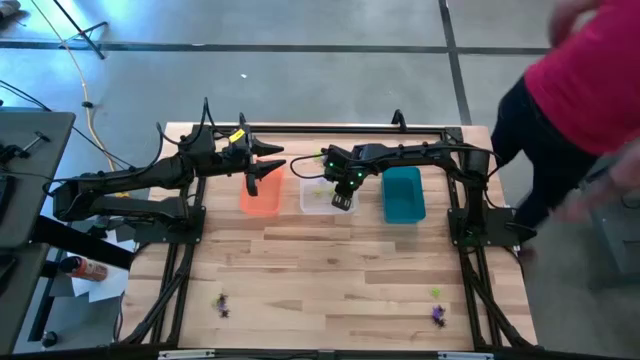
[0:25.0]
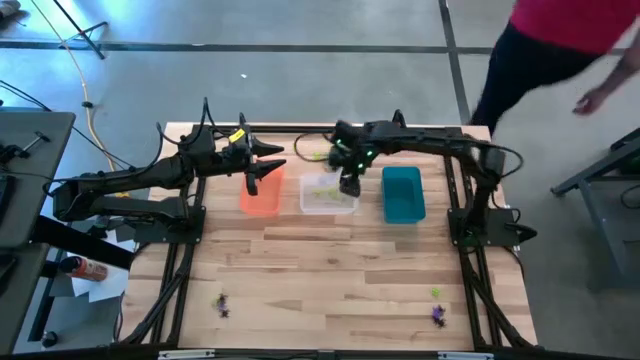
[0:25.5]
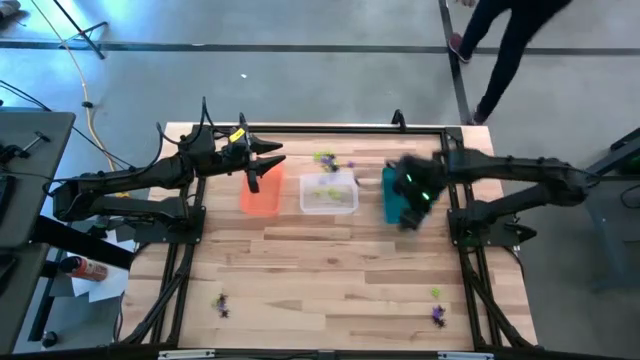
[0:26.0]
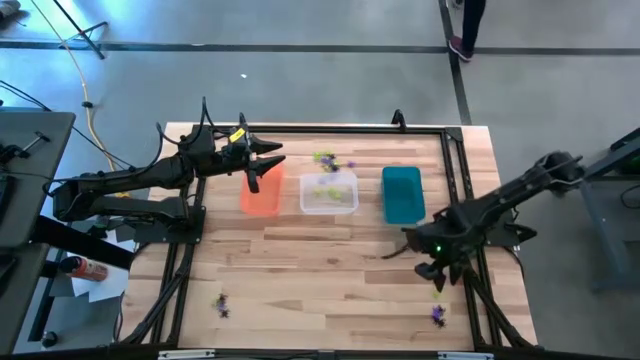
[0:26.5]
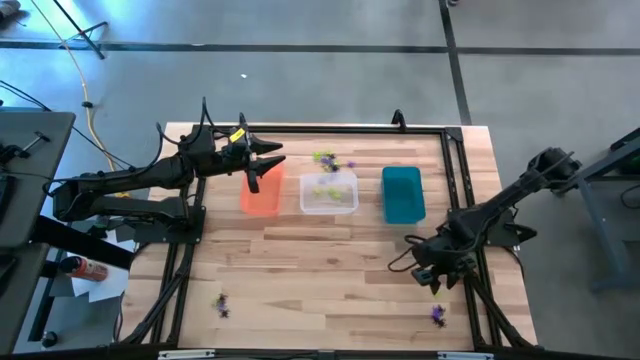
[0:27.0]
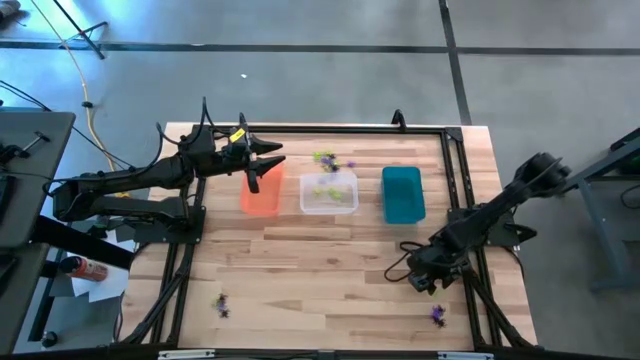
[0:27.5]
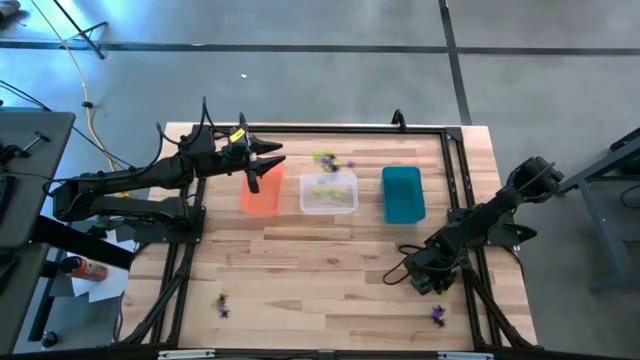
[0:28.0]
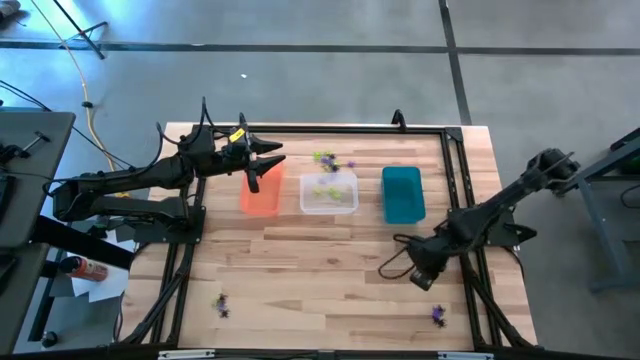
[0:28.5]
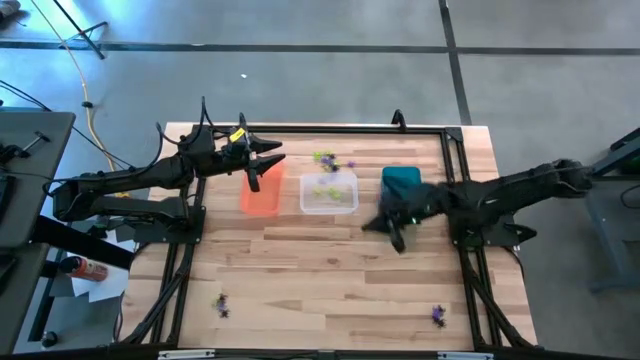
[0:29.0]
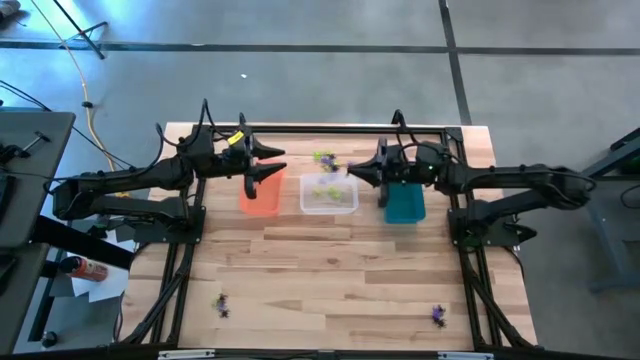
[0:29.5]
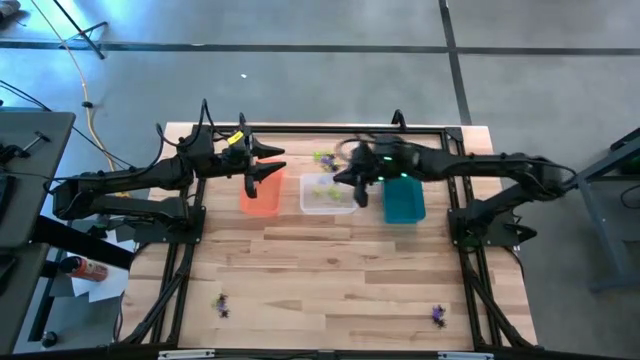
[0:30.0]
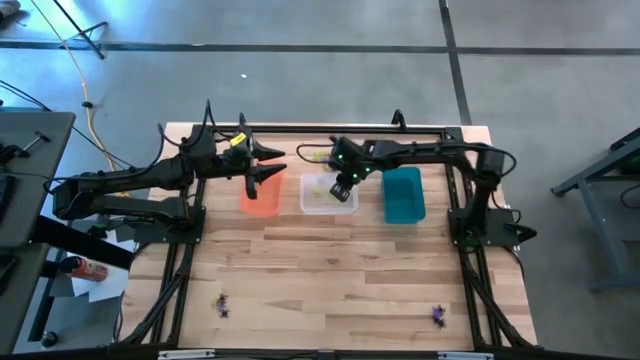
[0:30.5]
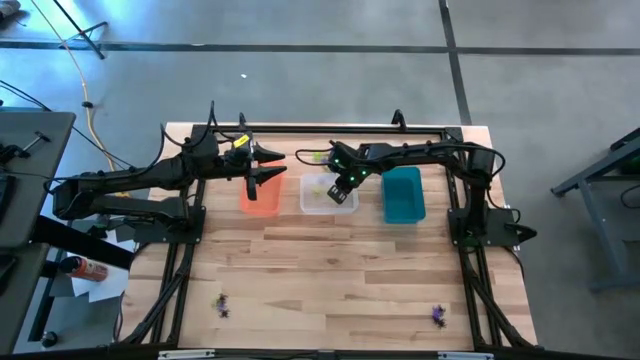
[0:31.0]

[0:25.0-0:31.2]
Task: Sort Halloween decoration
Put the green spider toy into the transparent bin

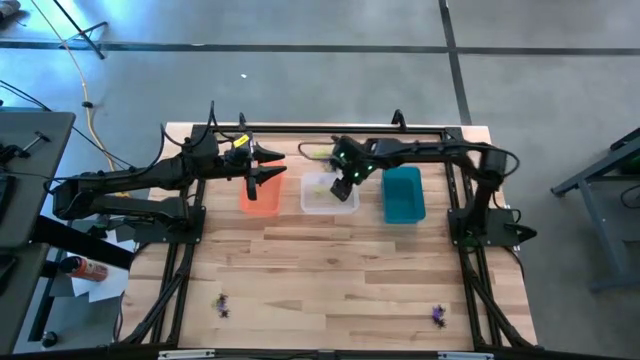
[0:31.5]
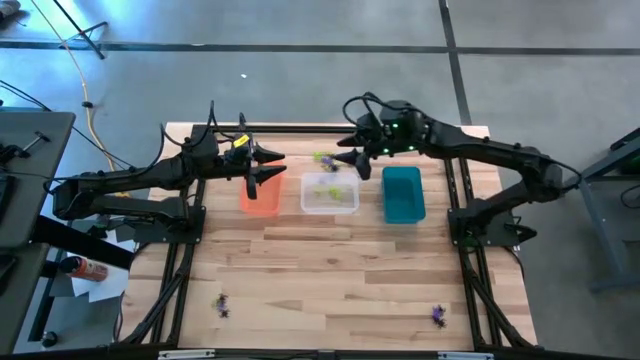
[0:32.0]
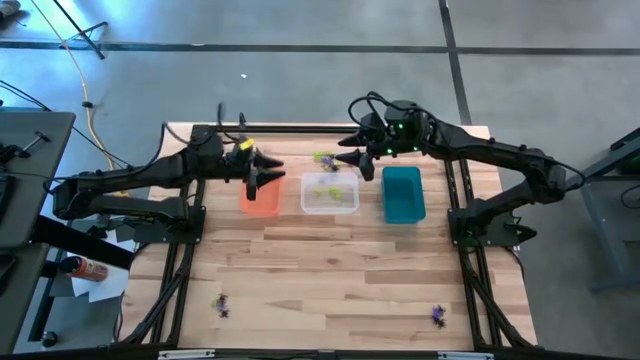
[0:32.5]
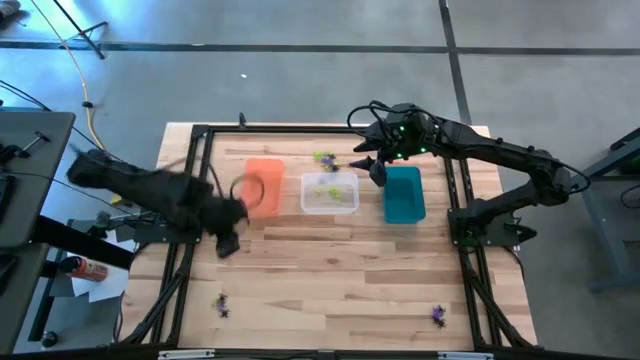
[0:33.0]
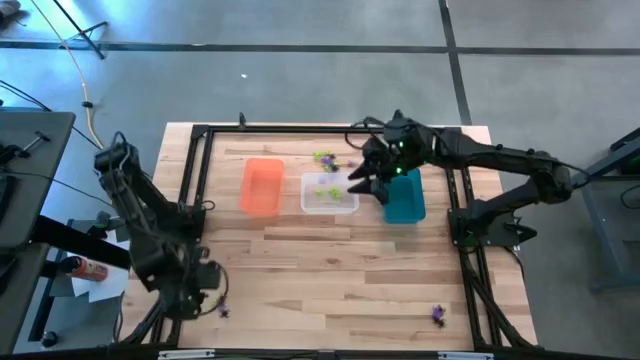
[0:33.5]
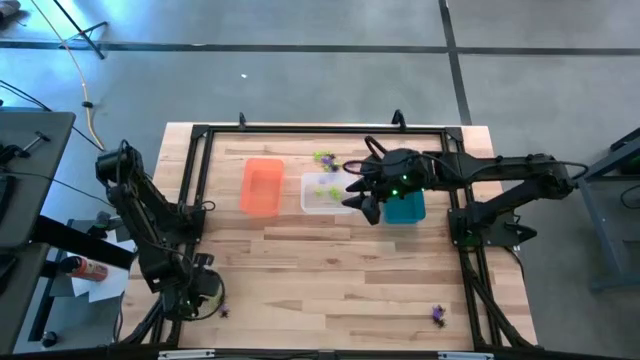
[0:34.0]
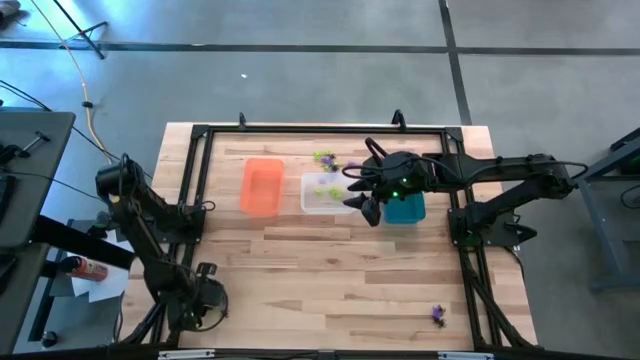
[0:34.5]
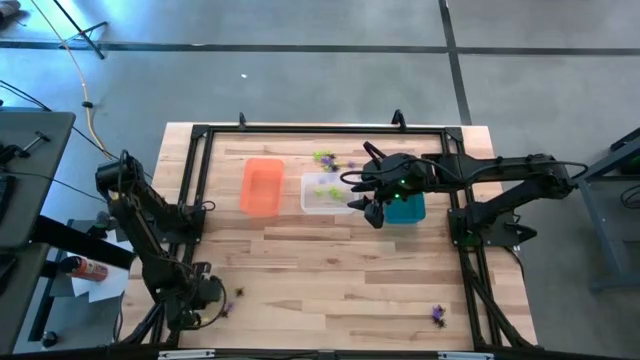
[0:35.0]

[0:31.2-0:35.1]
Put the green spider toy into the transparent bin

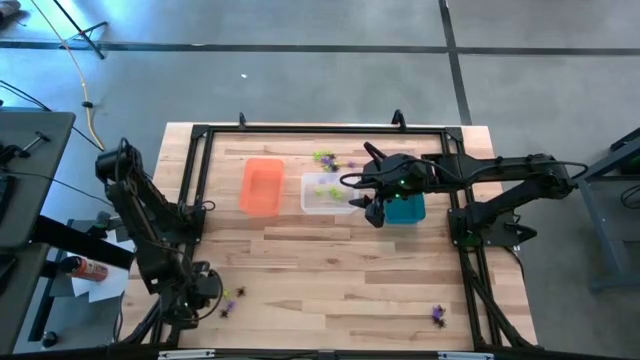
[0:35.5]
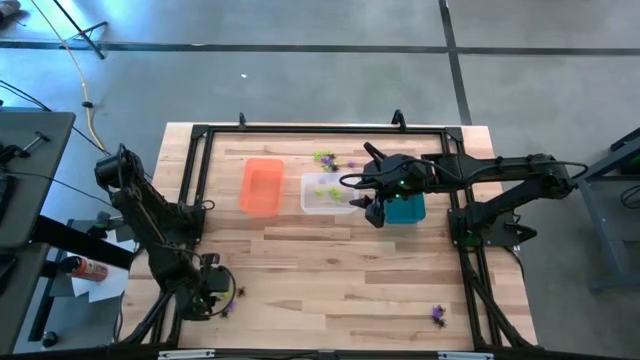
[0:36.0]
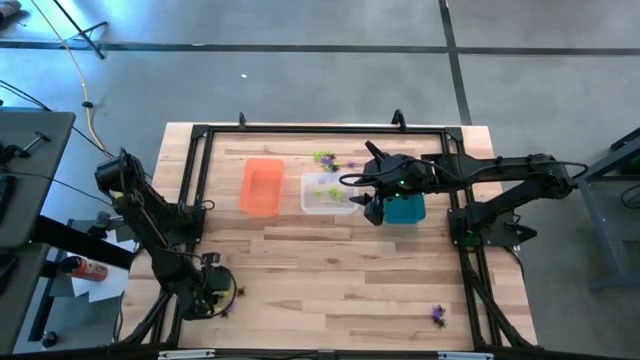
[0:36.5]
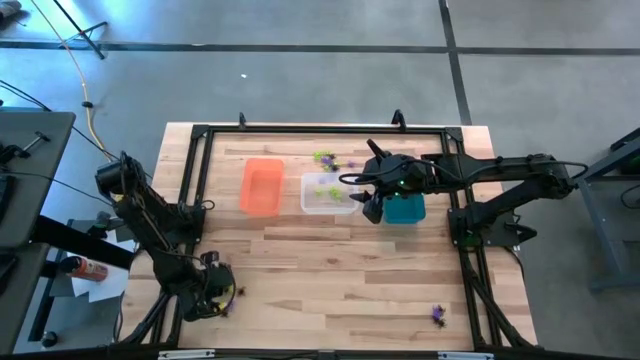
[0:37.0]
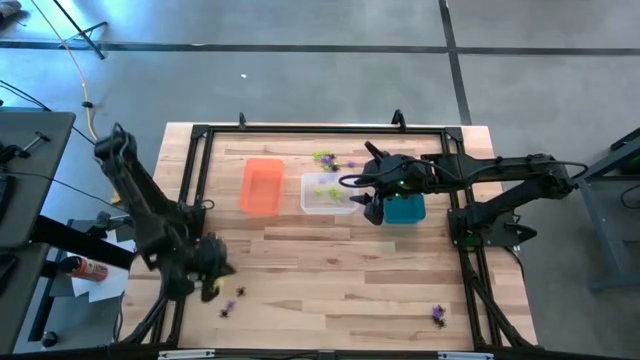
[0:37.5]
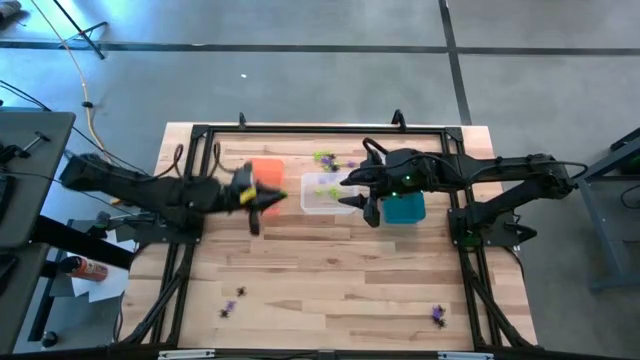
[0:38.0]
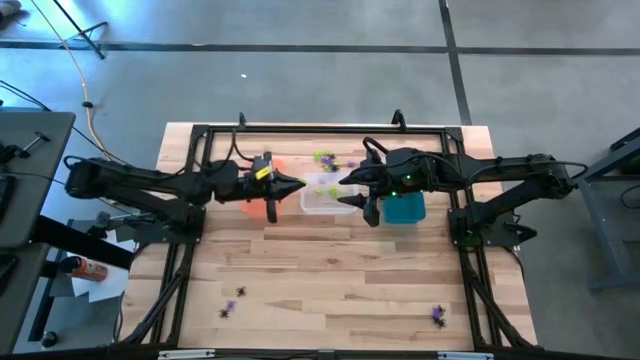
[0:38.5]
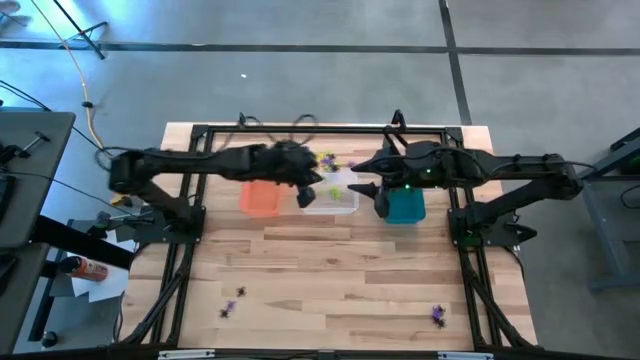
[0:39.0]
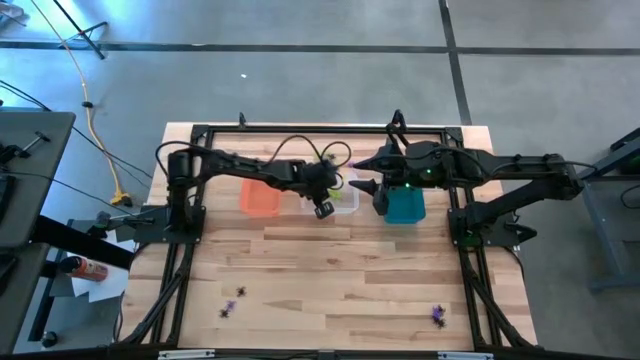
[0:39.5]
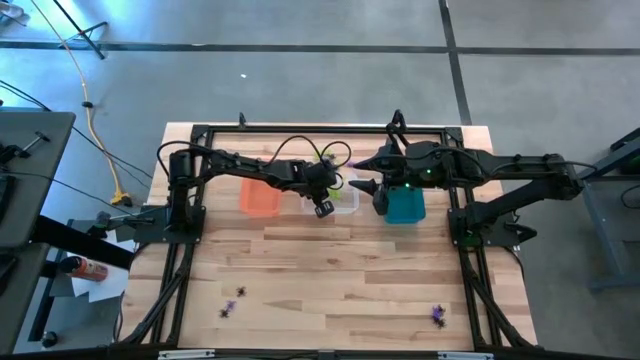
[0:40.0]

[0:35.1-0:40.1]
Put the green spider toy into the transparent bin

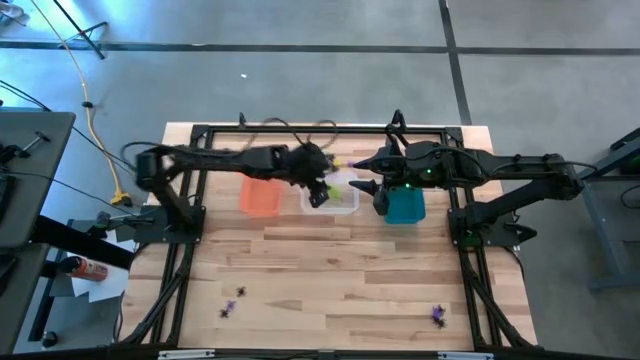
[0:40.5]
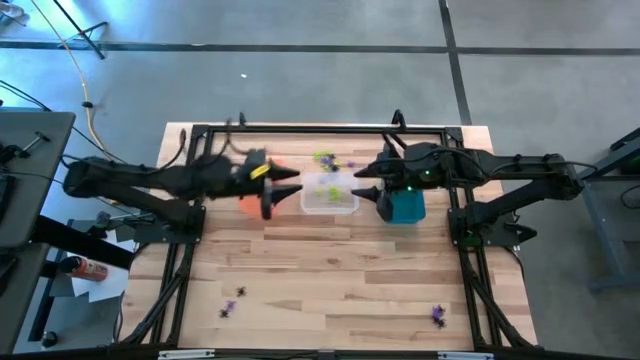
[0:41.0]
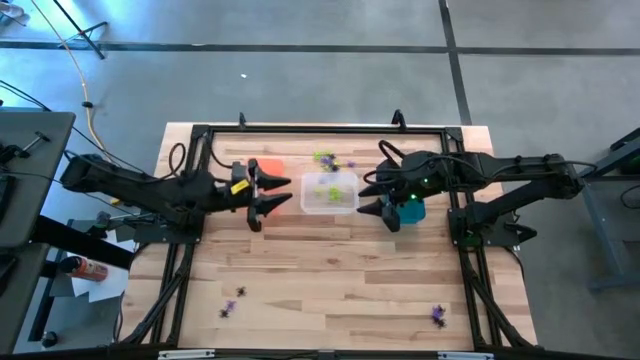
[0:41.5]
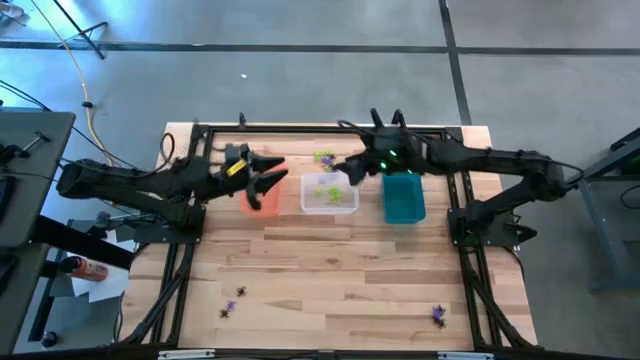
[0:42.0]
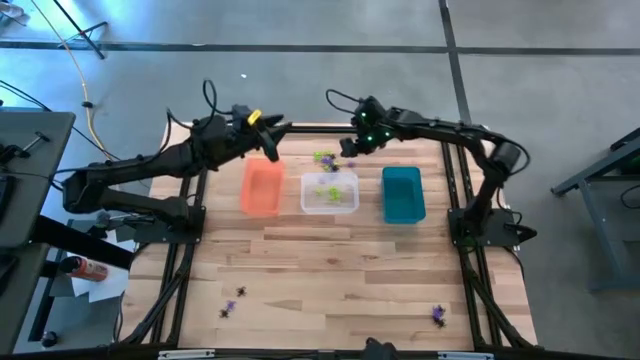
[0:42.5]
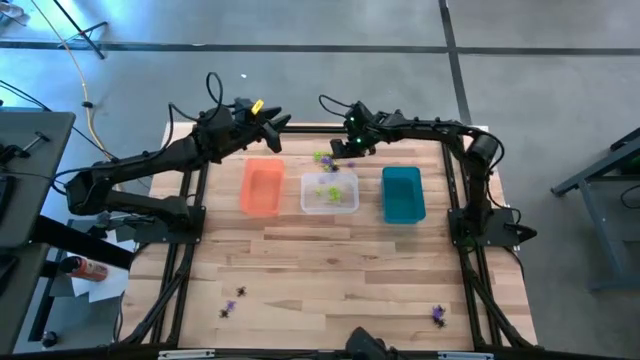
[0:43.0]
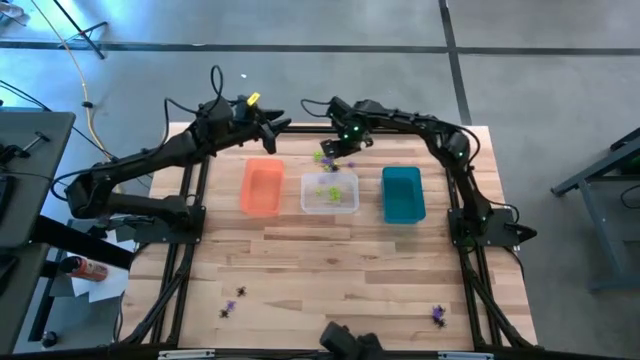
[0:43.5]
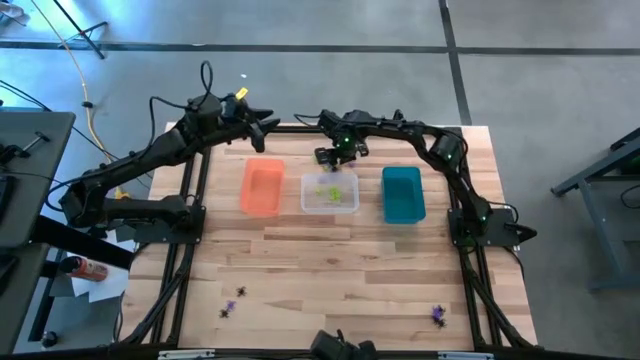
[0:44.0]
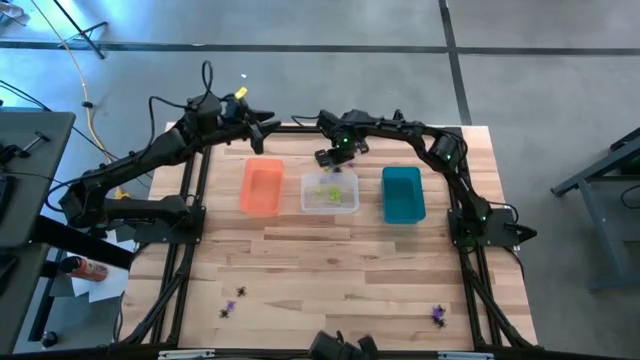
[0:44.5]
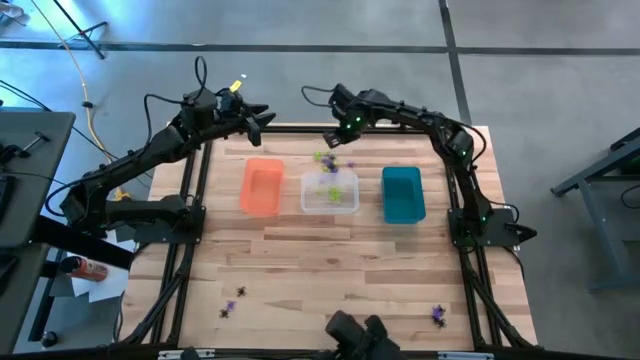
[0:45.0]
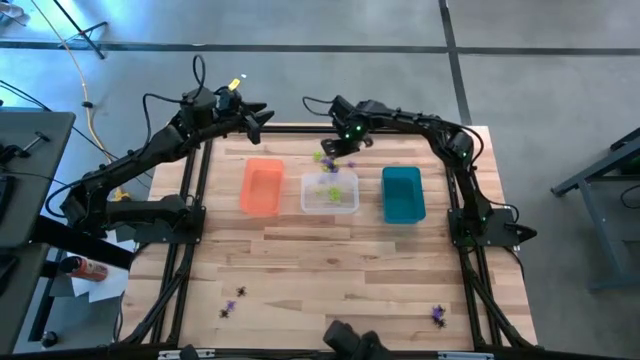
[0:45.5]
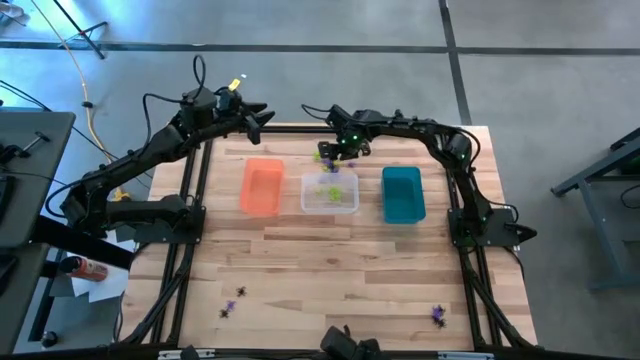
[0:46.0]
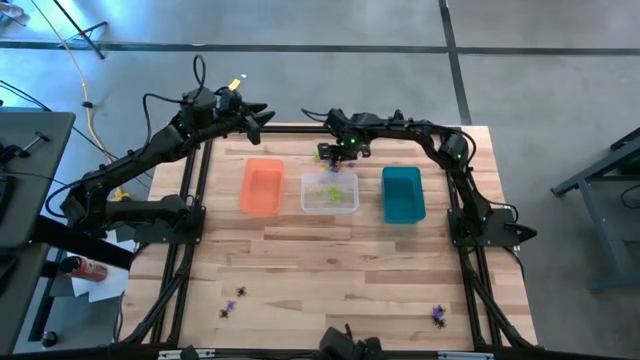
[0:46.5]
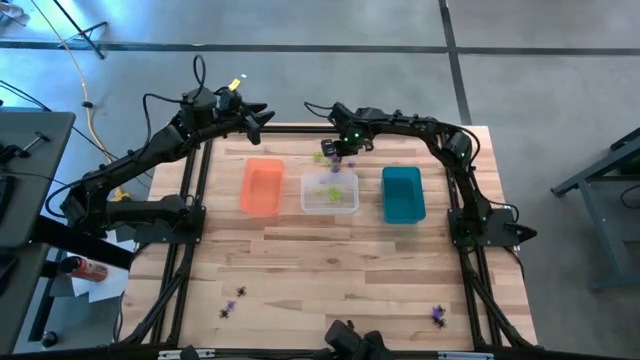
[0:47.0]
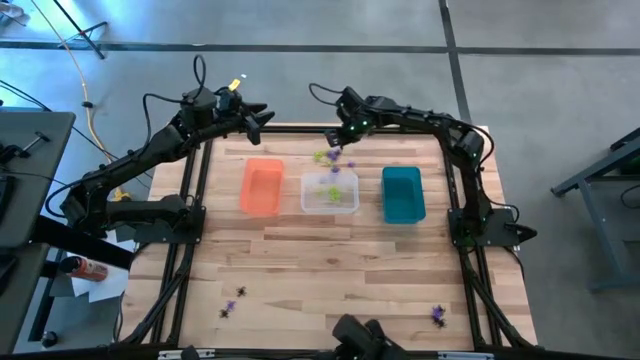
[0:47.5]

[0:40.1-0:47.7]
Put the green spider toy into the transparent bin
